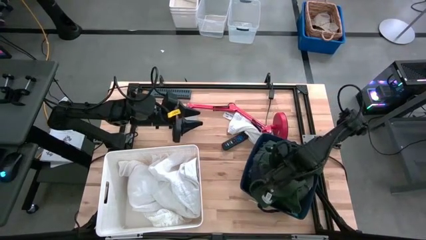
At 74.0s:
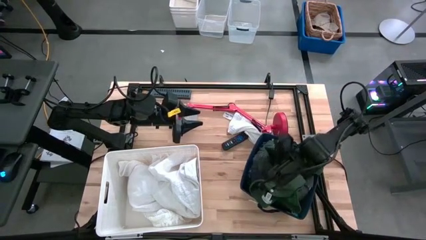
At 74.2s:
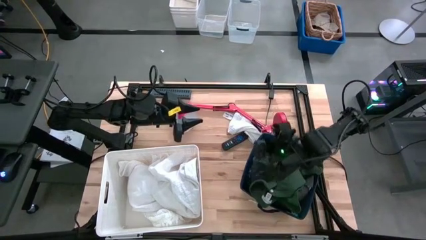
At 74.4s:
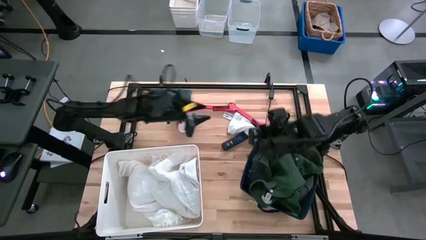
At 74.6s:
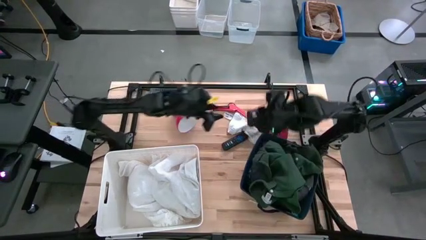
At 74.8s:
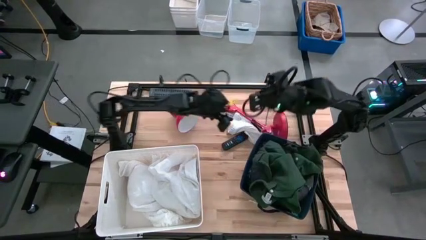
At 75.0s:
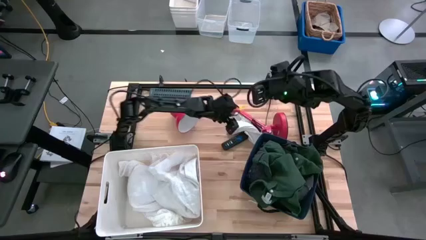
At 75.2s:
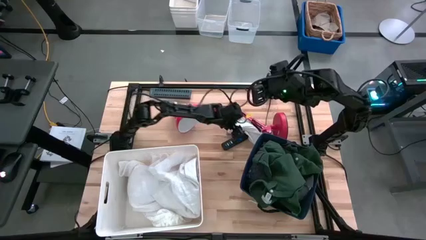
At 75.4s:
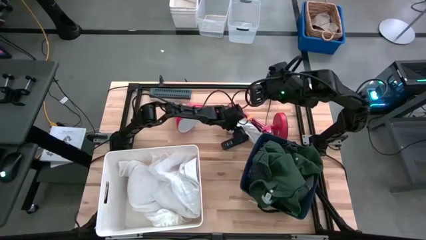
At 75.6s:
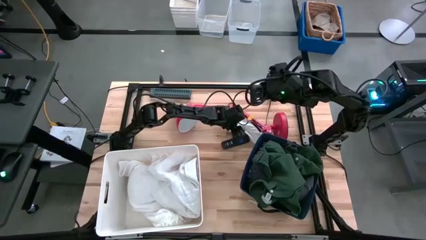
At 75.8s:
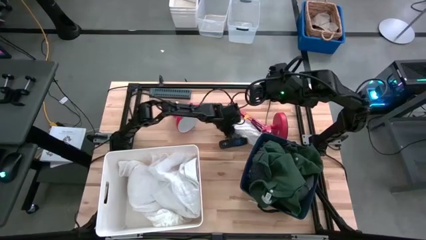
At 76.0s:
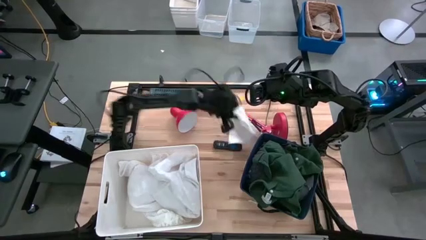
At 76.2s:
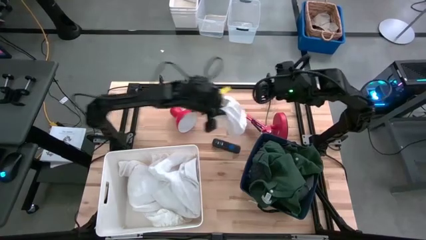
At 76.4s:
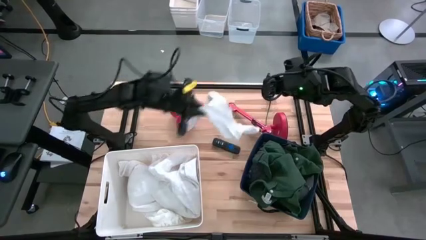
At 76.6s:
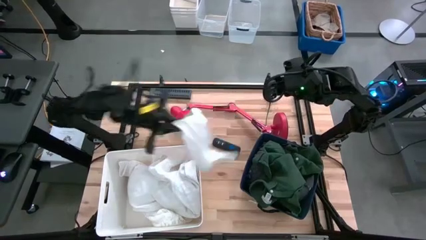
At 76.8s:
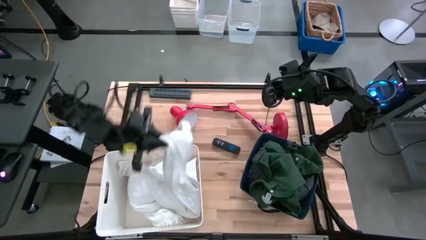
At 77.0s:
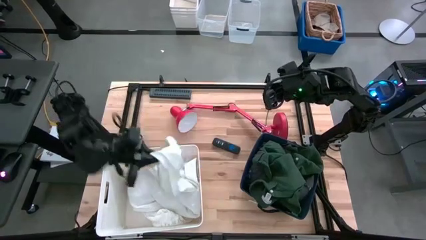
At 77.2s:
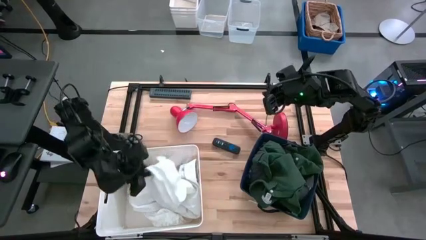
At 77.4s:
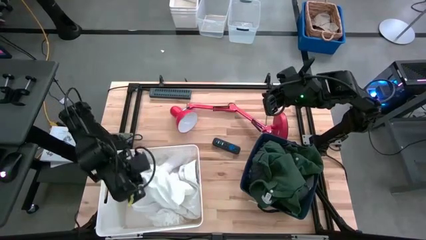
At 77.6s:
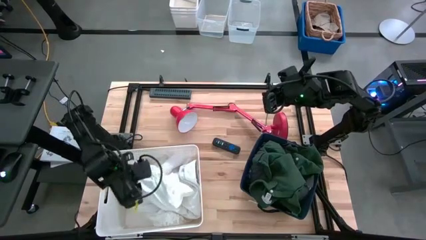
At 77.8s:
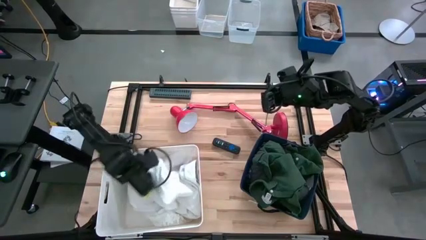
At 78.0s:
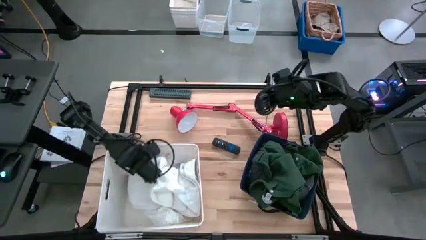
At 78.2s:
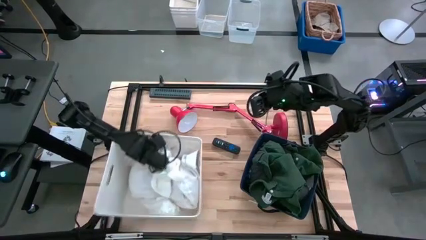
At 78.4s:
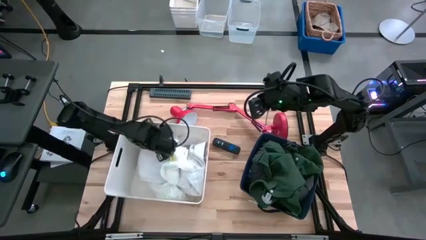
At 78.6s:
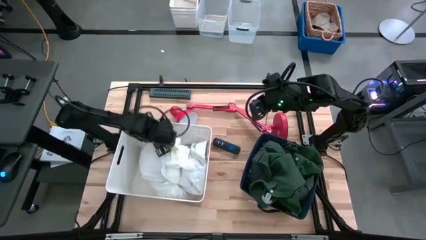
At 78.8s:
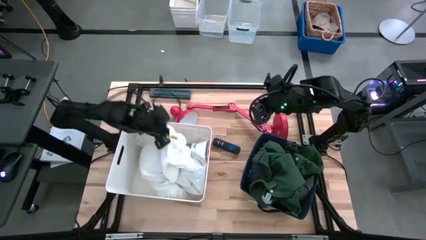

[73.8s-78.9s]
Task: Sort clothes
Put the white underwear into the white bin

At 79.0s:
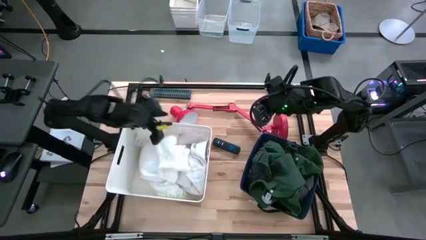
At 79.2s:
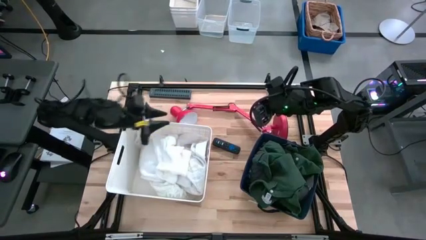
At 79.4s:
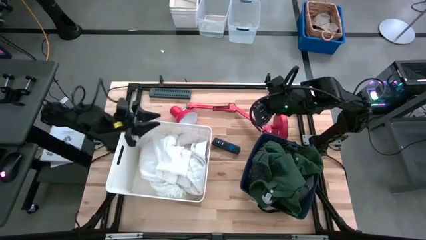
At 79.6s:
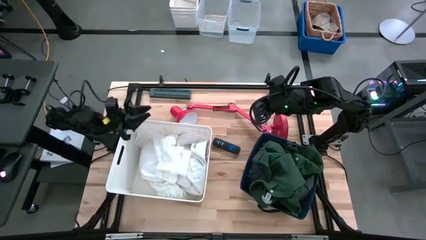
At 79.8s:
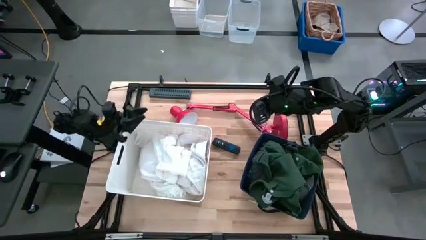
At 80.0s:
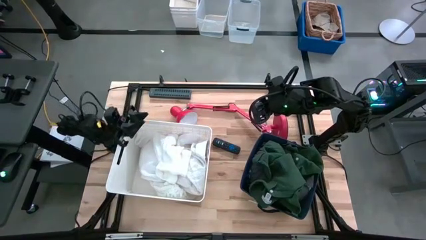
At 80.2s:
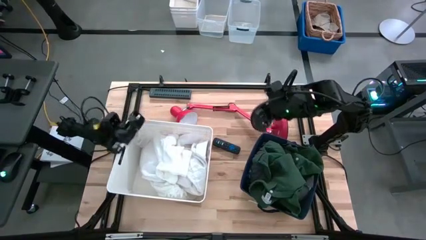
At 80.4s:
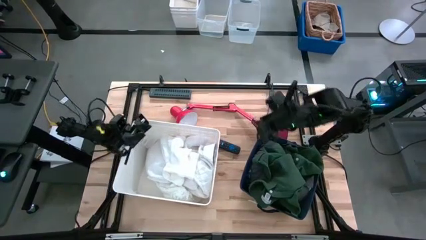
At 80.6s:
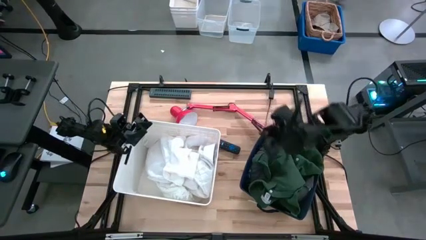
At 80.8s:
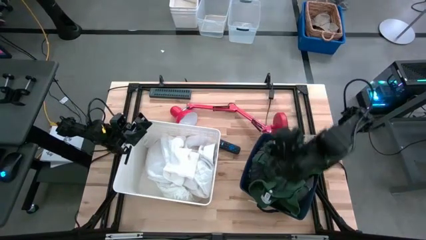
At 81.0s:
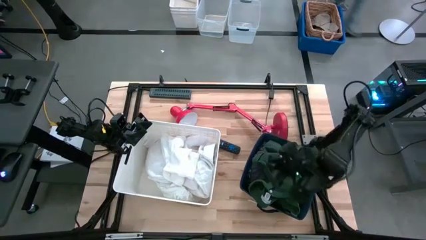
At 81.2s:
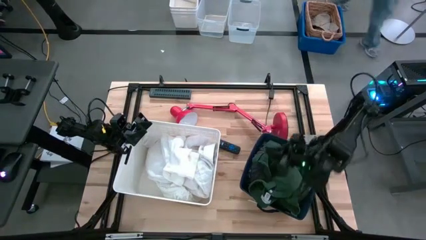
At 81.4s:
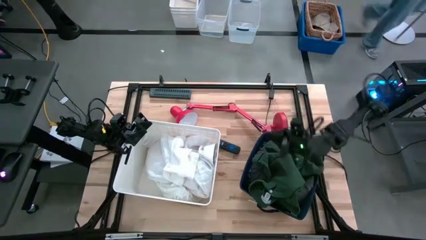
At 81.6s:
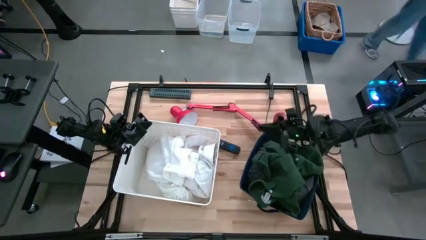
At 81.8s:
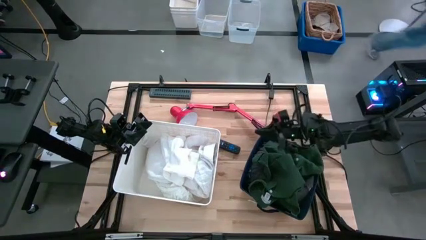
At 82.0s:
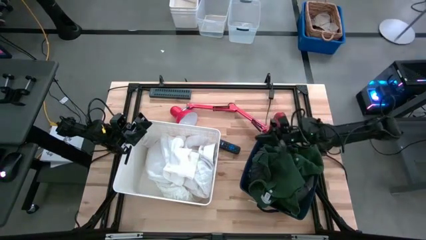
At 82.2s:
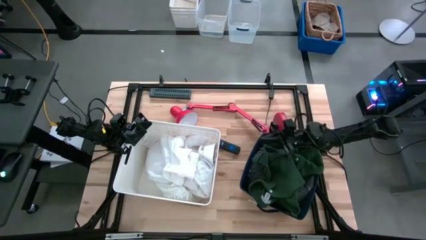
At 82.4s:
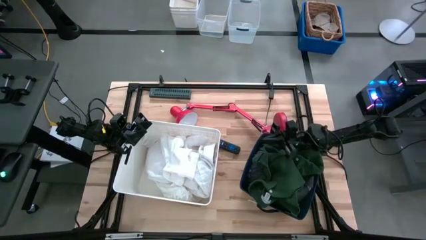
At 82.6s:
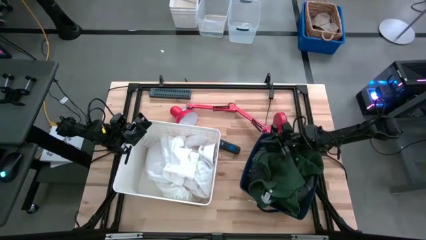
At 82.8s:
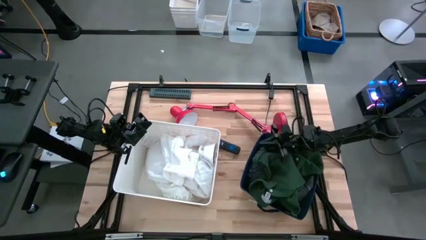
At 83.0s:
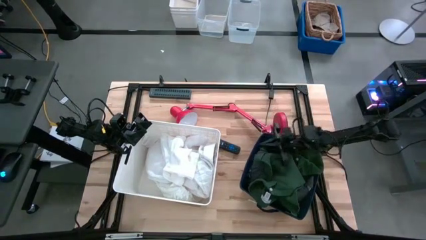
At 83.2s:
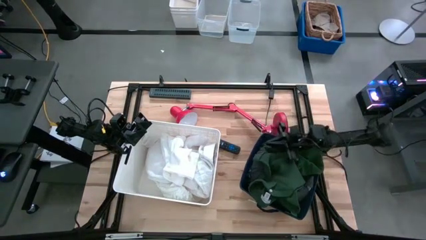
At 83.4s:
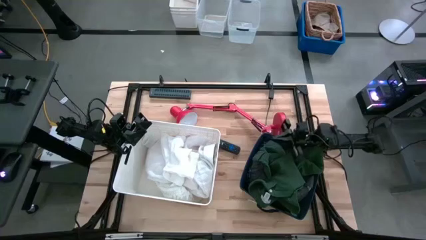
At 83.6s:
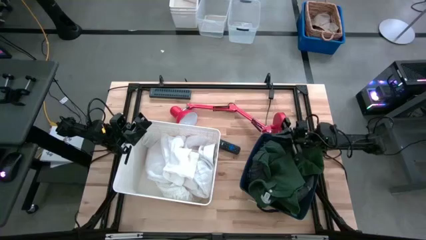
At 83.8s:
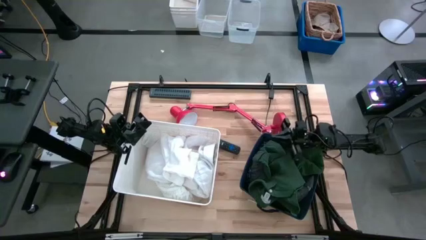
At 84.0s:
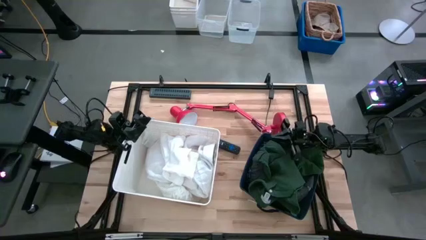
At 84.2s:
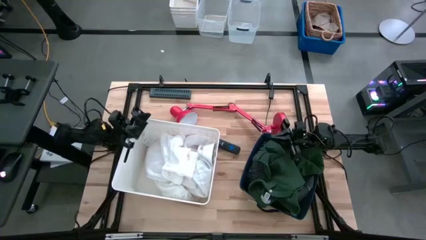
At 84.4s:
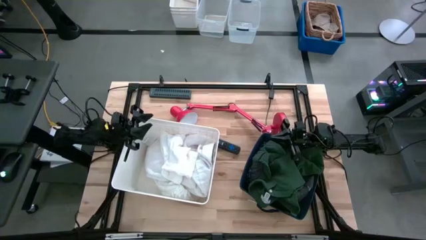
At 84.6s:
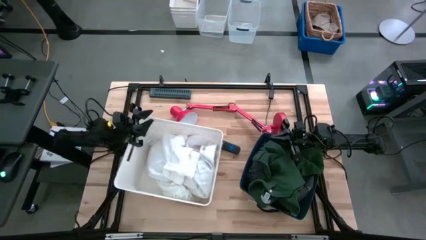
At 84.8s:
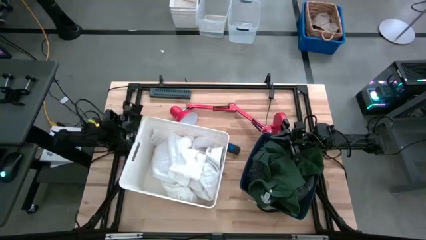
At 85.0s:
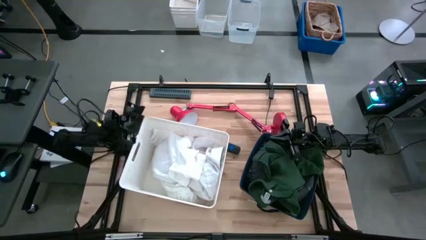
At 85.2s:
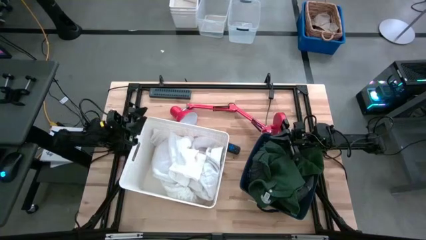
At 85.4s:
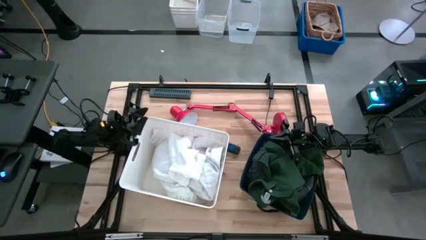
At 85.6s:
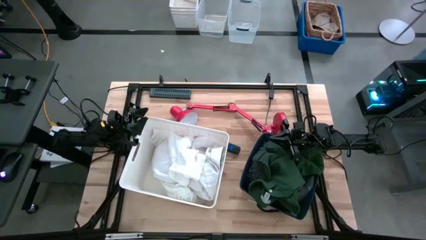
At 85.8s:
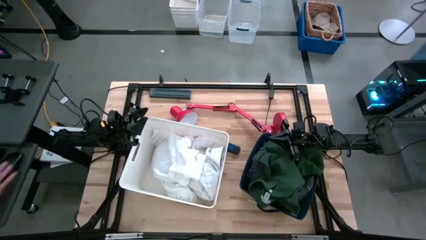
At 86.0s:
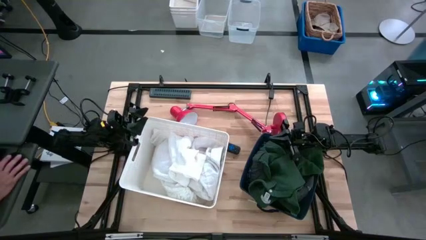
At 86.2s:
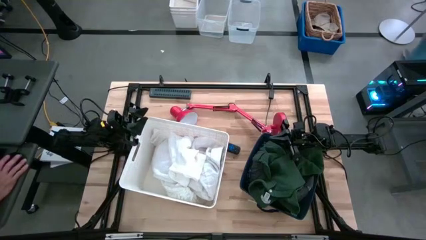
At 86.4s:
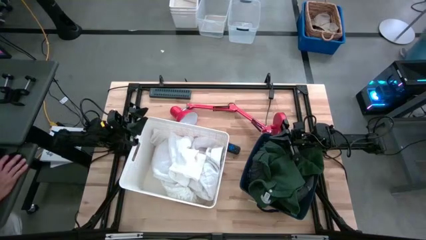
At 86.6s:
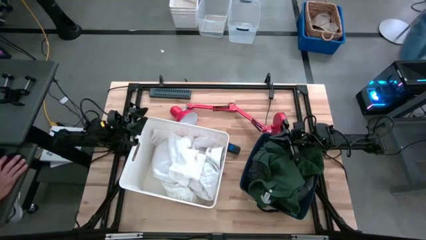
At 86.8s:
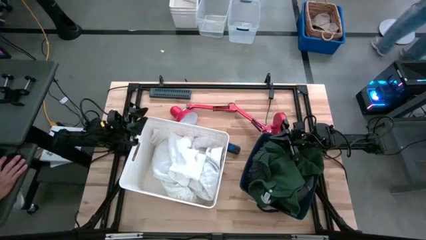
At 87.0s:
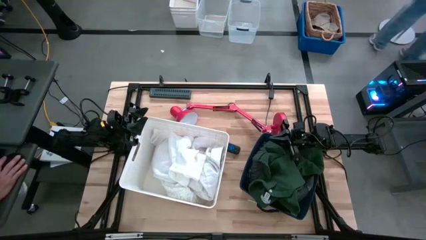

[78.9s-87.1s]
Return to Home Position
